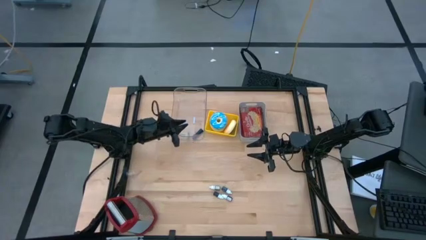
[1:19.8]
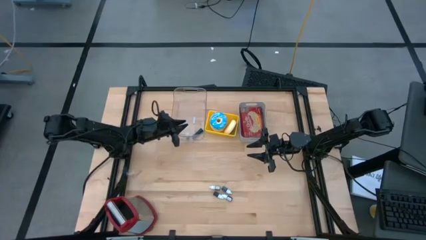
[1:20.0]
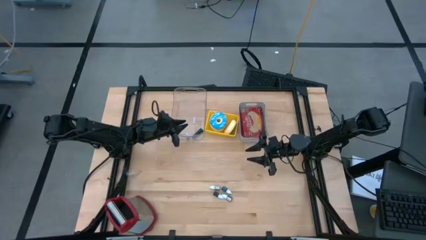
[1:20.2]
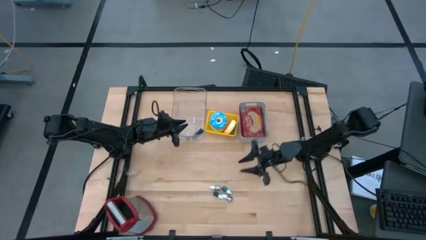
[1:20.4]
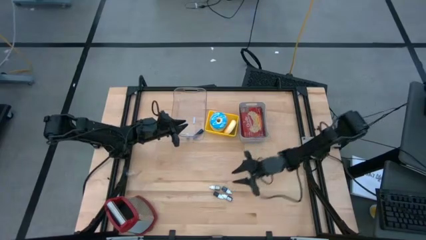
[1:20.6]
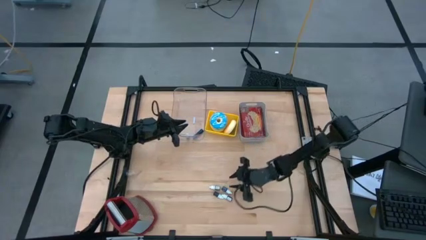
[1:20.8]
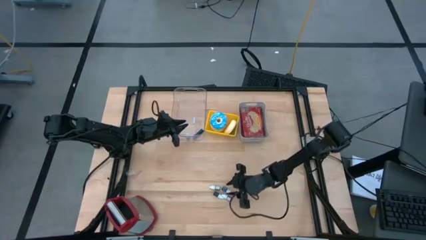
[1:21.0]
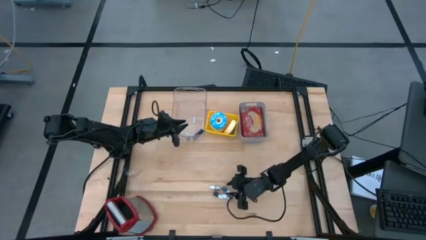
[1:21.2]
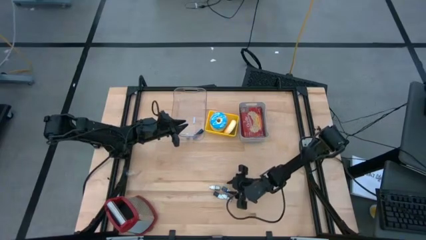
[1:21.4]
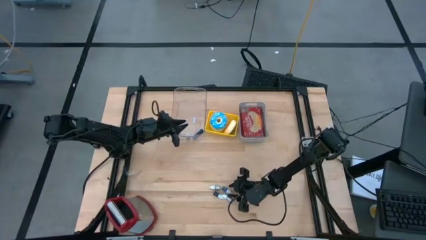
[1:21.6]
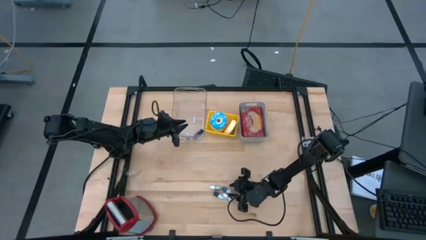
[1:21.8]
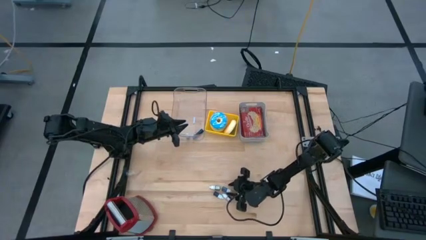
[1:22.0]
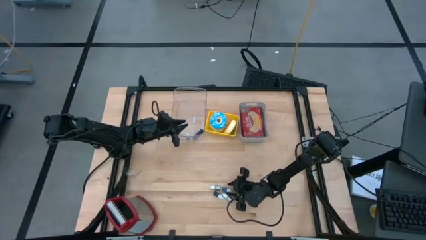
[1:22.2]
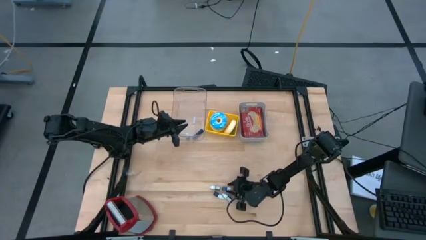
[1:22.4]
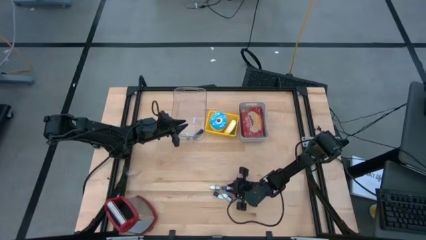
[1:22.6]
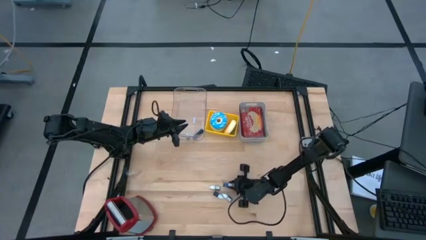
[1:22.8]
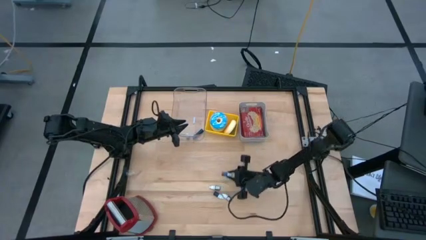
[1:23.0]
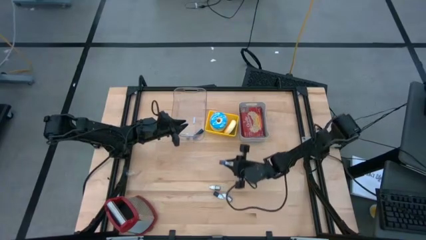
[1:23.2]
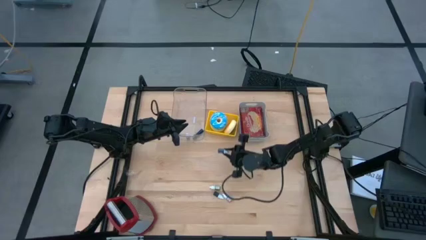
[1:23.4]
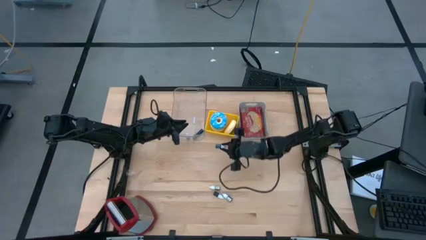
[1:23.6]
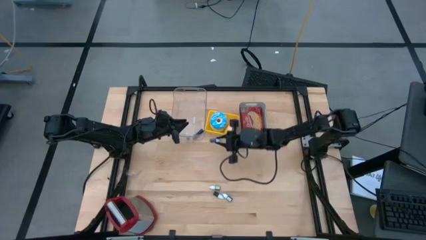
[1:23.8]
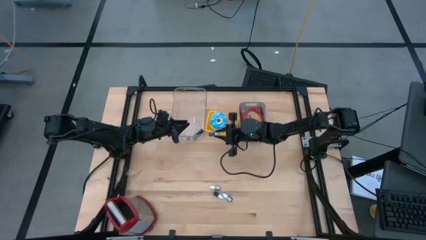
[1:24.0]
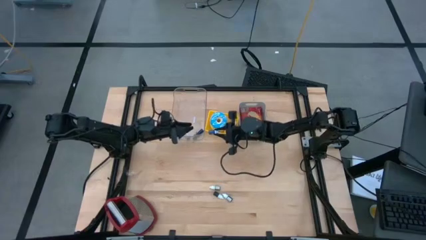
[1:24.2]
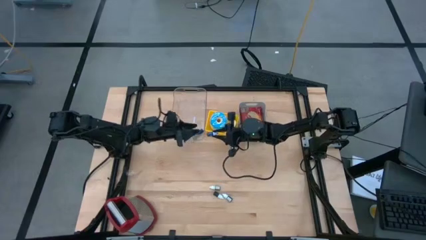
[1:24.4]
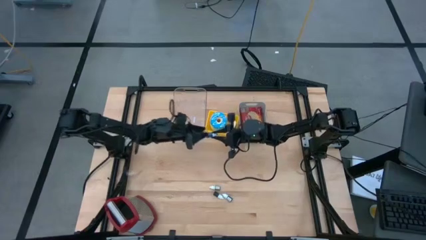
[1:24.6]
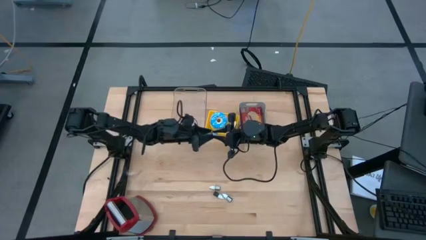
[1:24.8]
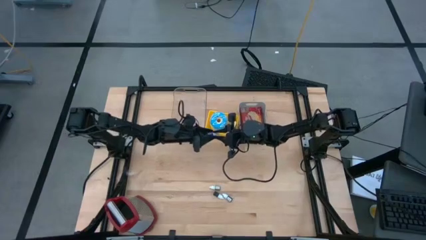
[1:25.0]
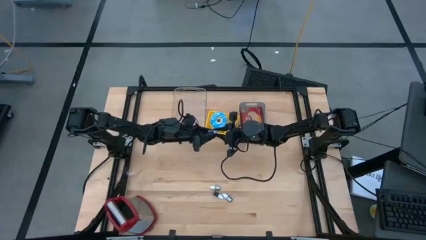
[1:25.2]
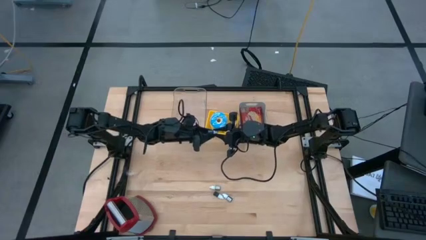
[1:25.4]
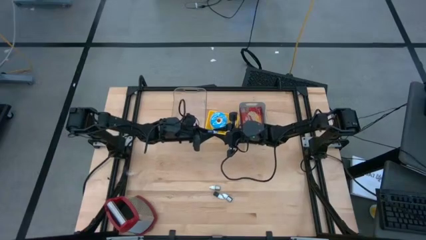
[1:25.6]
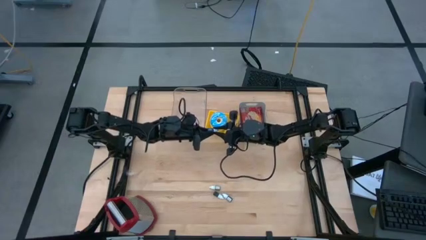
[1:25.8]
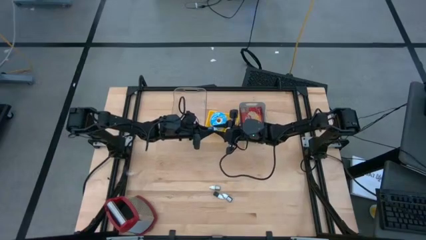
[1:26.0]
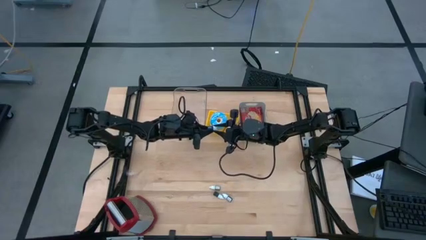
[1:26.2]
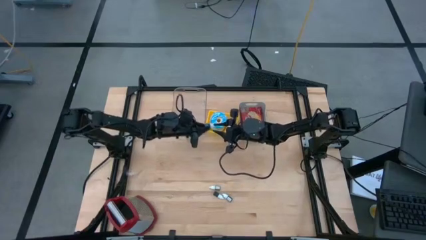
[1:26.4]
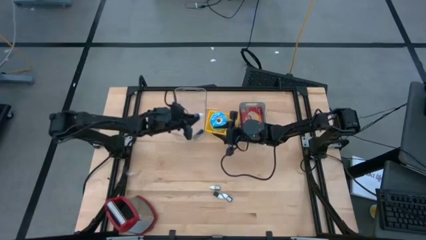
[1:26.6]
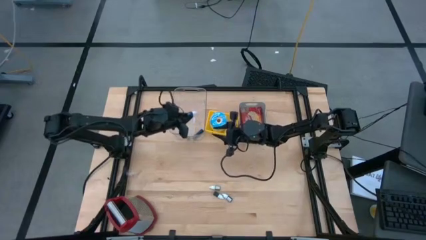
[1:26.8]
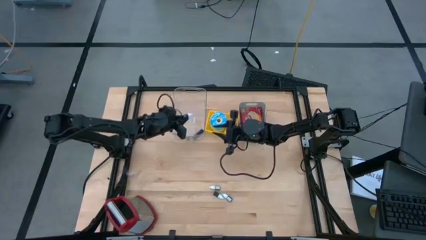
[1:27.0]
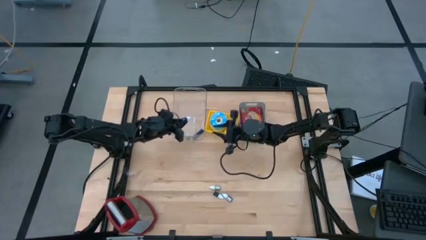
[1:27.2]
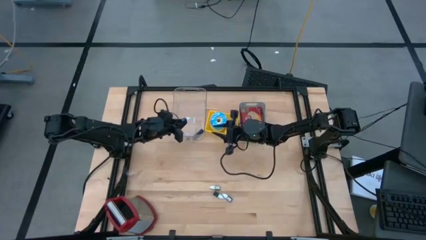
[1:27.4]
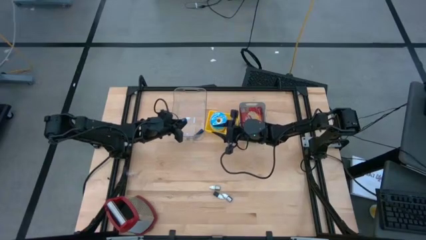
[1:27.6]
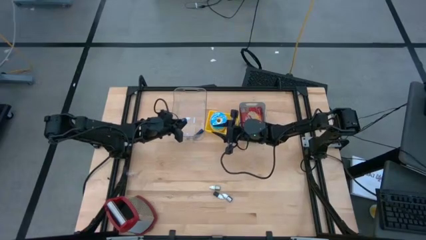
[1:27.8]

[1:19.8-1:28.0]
Put the dark blue food coloring bottle into the transparent bin

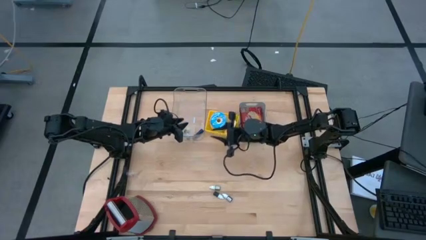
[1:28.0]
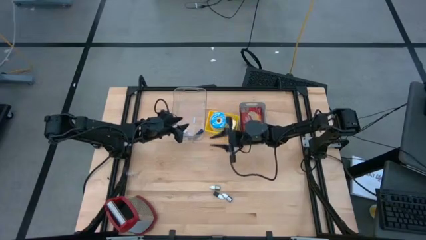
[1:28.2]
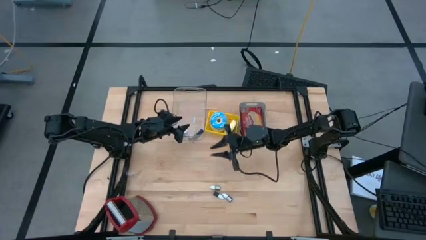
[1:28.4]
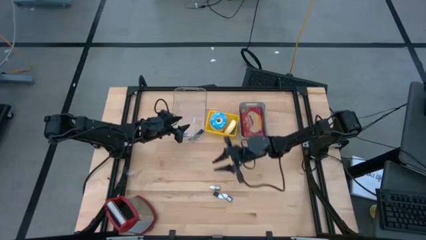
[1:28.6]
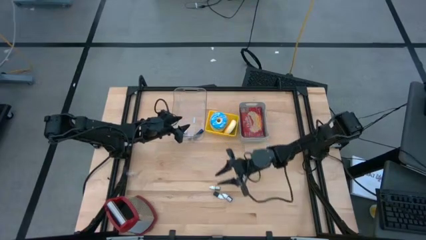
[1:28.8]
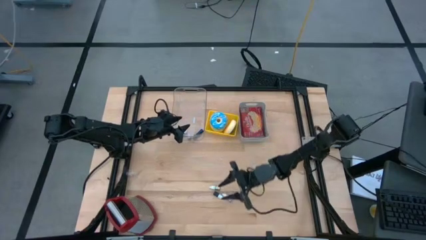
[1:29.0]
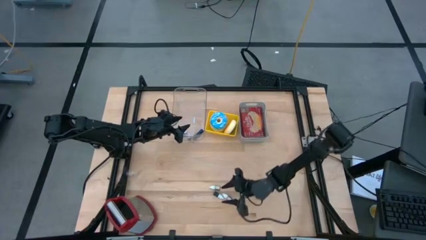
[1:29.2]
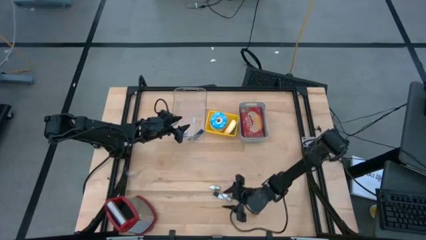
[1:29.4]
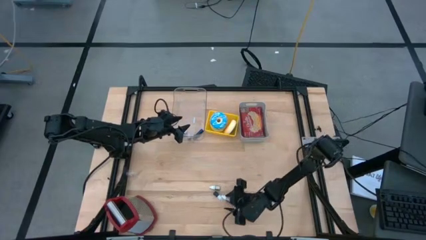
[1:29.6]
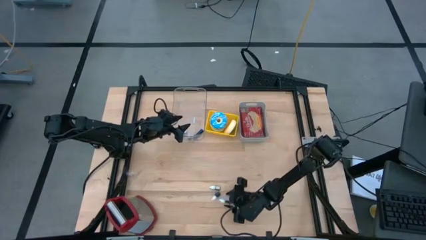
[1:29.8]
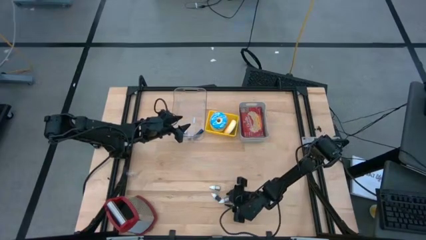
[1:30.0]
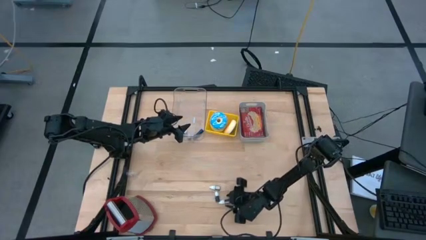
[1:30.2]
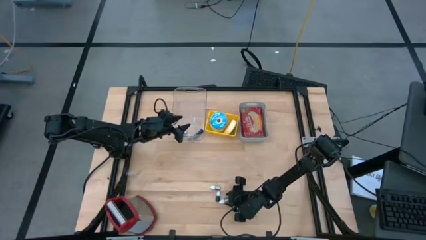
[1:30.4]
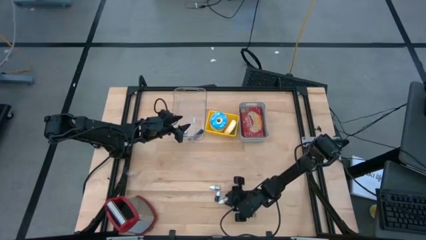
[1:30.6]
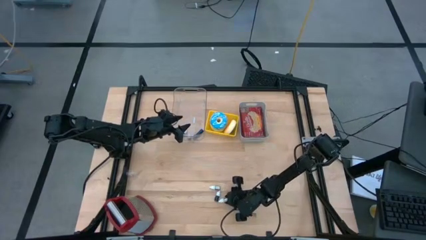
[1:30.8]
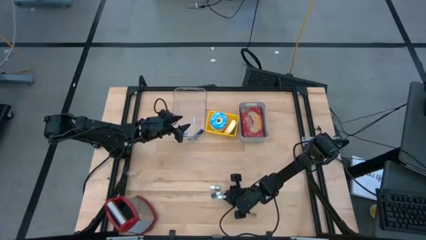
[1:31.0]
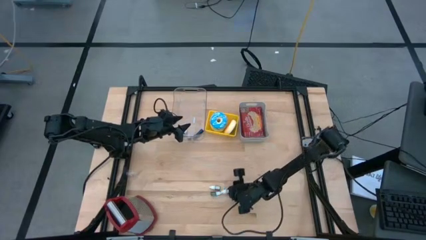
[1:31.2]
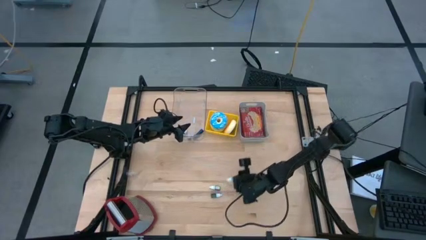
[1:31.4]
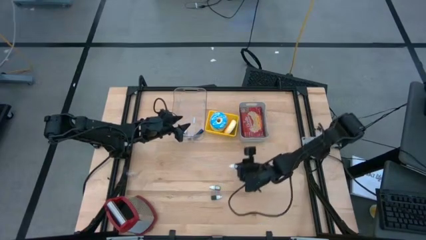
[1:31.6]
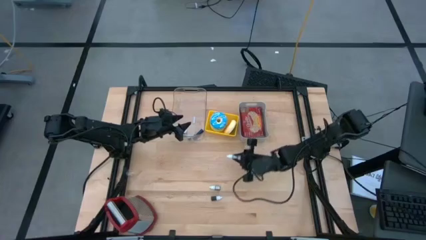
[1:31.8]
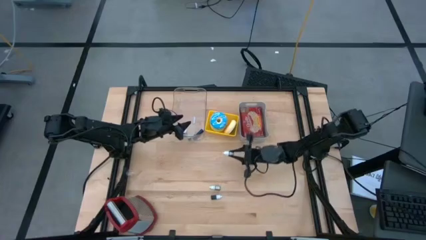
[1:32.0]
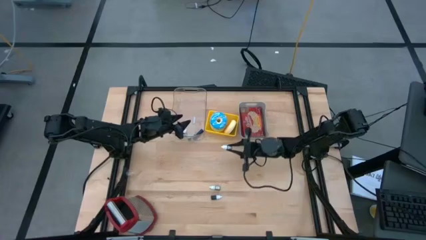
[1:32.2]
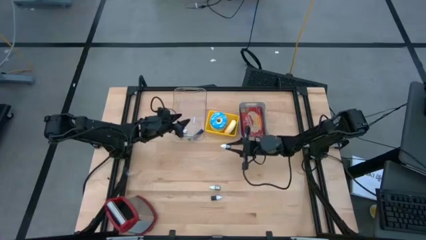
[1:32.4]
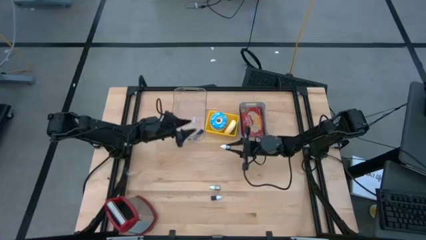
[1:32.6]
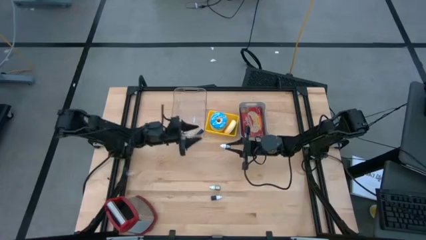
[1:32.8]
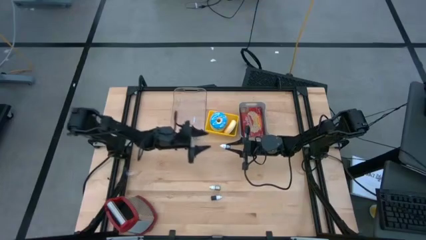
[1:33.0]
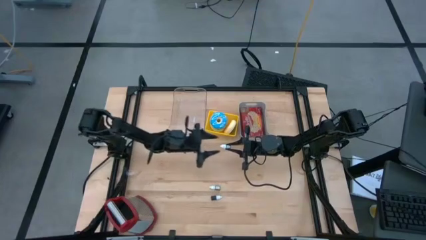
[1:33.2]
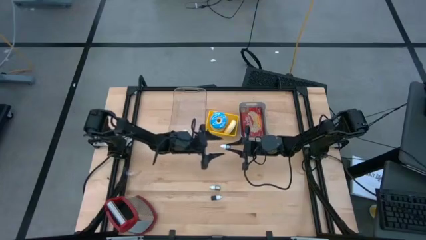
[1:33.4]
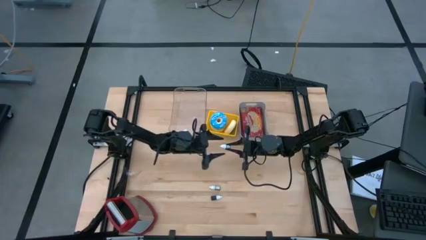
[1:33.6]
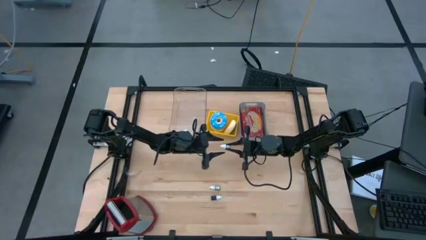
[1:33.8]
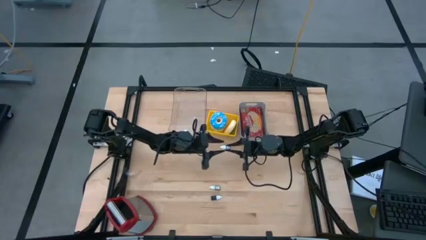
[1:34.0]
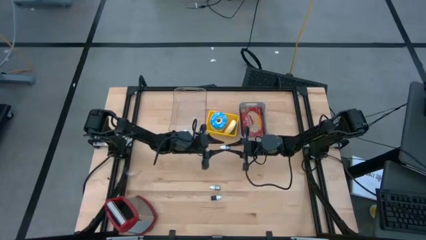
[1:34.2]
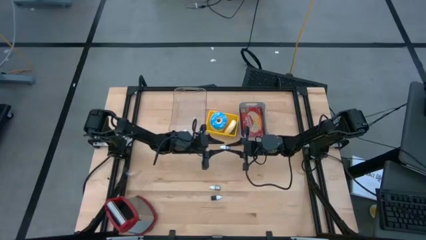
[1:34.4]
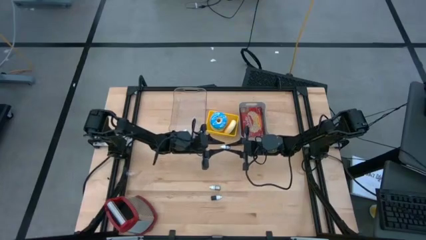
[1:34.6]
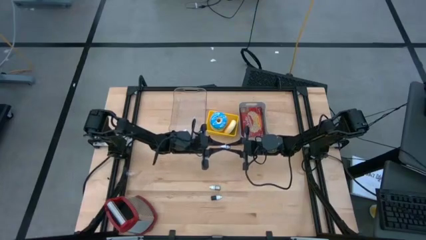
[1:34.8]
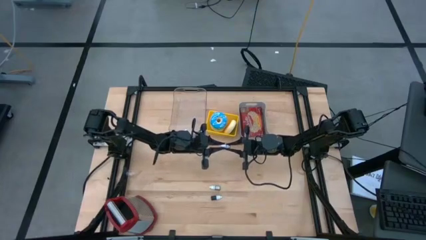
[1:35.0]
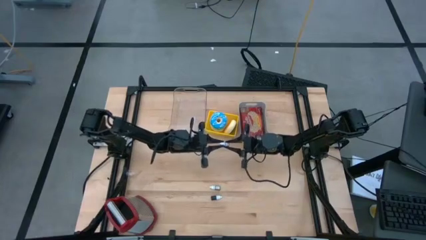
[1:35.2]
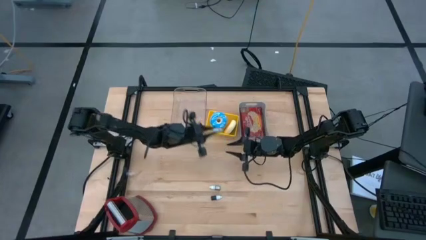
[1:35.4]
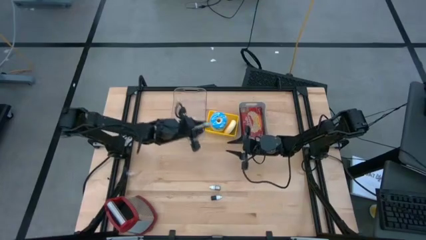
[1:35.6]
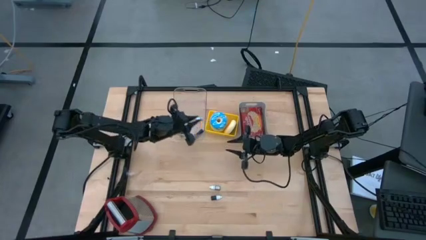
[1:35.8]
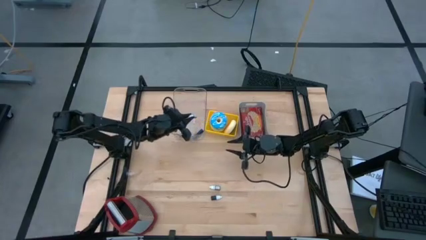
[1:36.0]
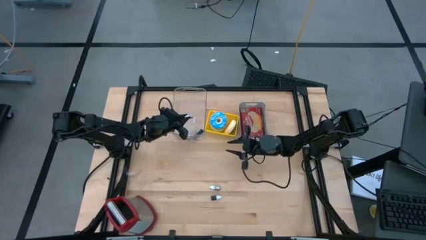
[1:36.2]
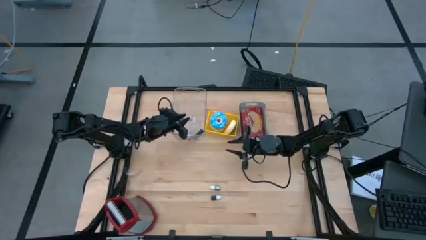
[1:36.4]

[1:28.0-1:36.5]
Put the violet food coloring bottle into the transparent bin
